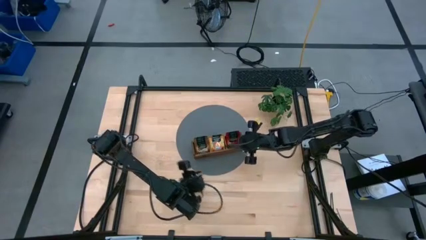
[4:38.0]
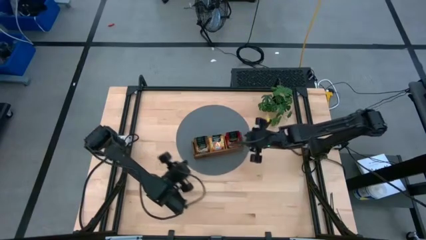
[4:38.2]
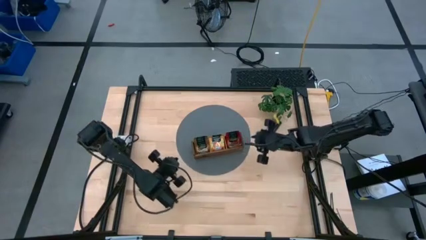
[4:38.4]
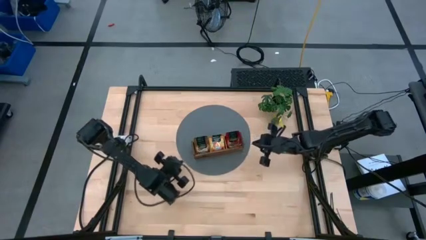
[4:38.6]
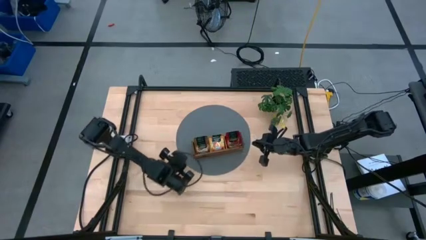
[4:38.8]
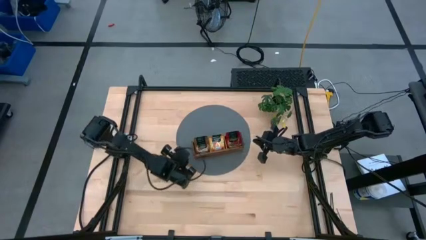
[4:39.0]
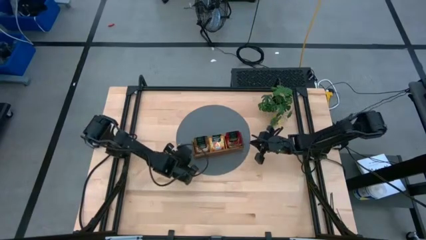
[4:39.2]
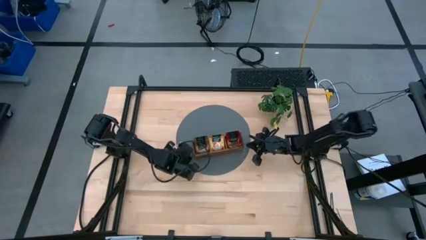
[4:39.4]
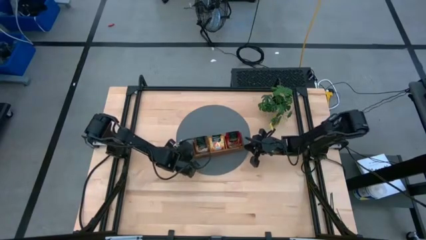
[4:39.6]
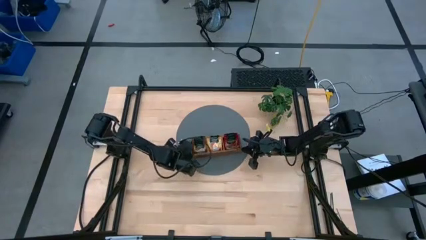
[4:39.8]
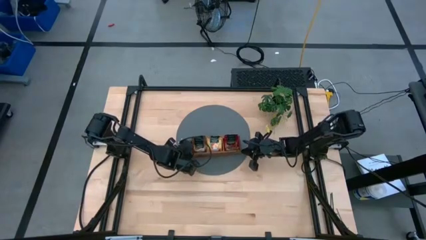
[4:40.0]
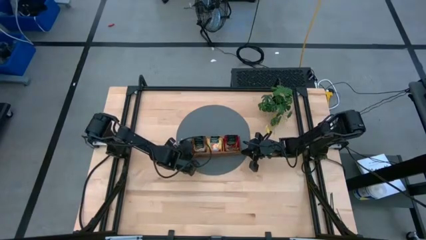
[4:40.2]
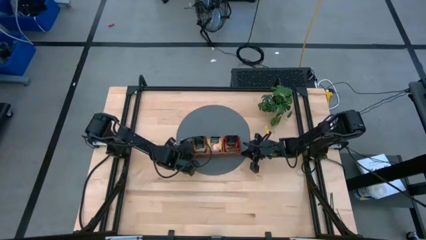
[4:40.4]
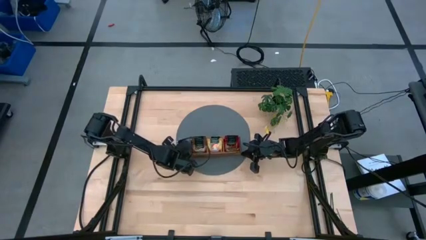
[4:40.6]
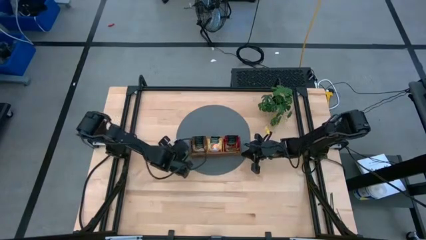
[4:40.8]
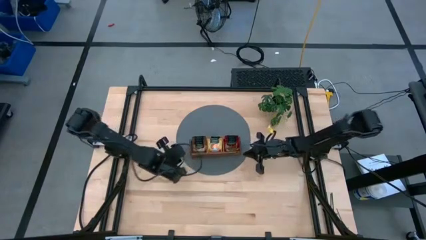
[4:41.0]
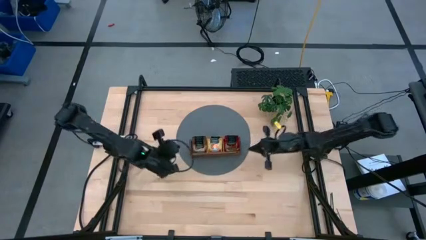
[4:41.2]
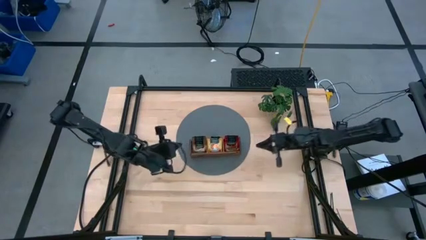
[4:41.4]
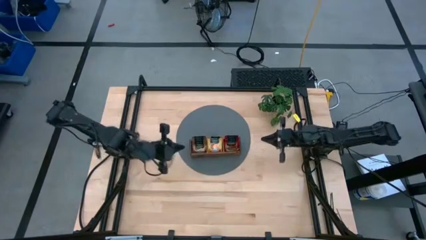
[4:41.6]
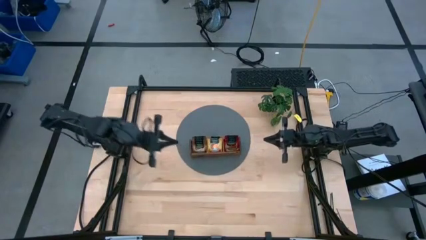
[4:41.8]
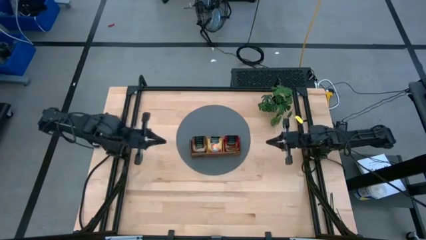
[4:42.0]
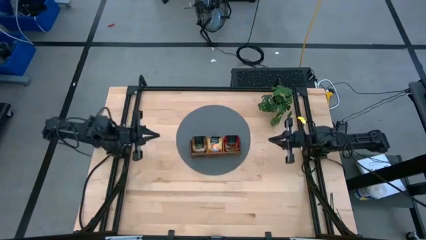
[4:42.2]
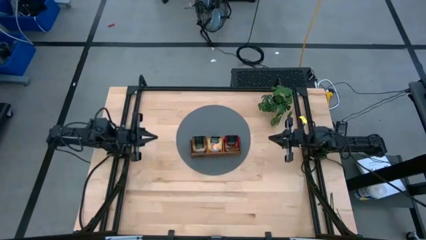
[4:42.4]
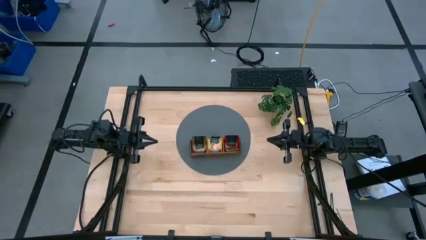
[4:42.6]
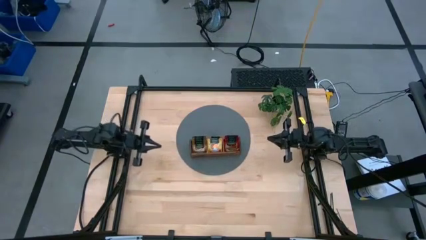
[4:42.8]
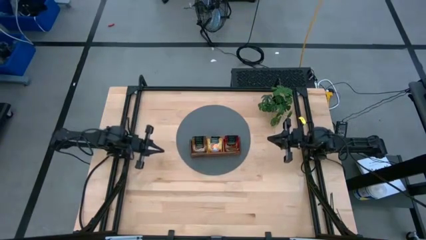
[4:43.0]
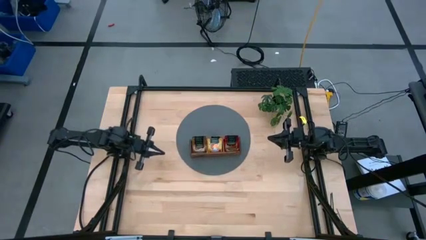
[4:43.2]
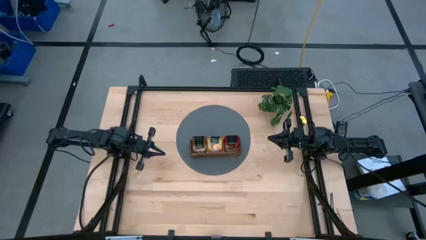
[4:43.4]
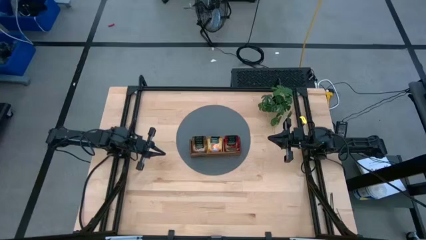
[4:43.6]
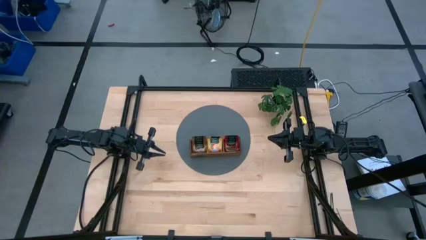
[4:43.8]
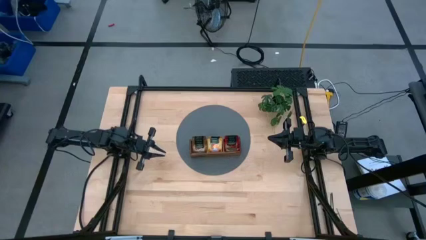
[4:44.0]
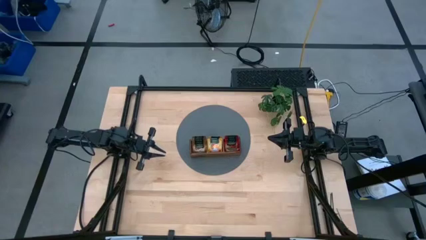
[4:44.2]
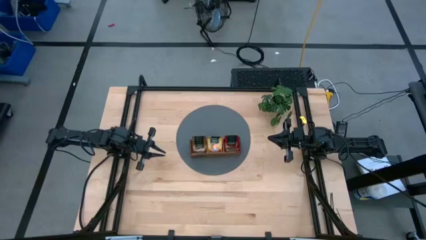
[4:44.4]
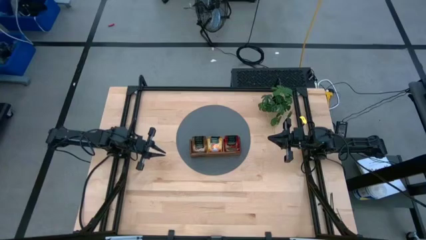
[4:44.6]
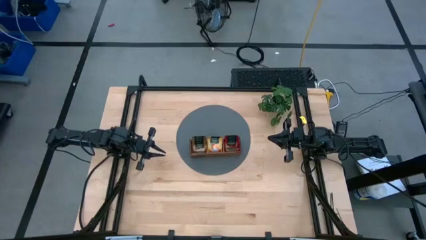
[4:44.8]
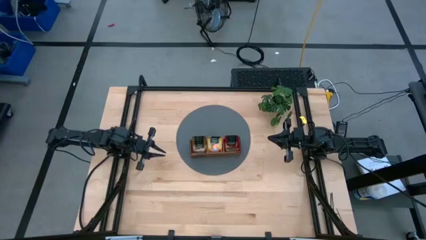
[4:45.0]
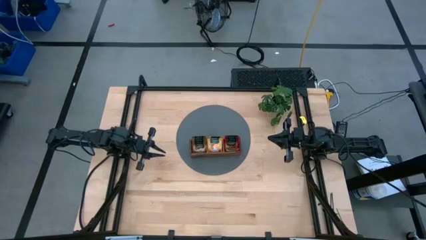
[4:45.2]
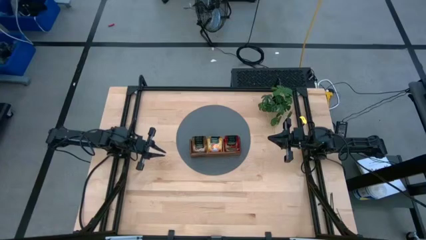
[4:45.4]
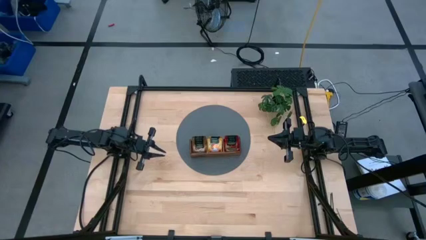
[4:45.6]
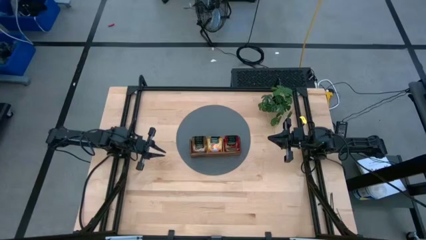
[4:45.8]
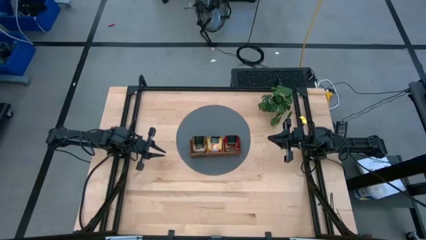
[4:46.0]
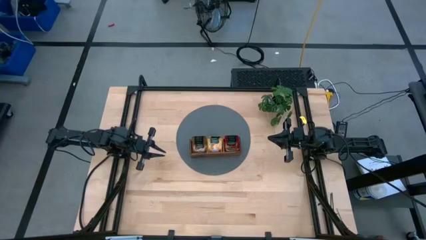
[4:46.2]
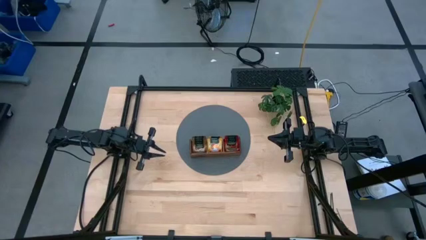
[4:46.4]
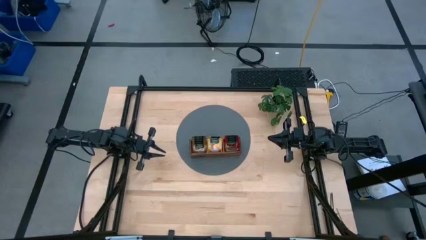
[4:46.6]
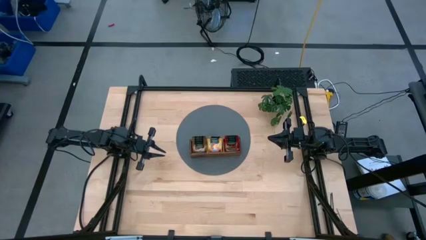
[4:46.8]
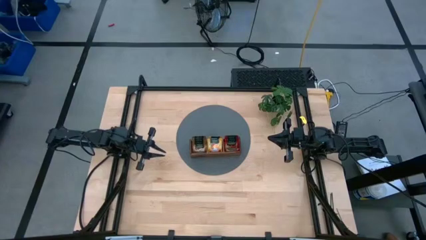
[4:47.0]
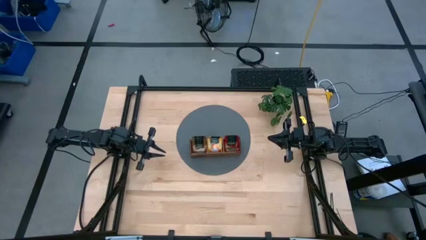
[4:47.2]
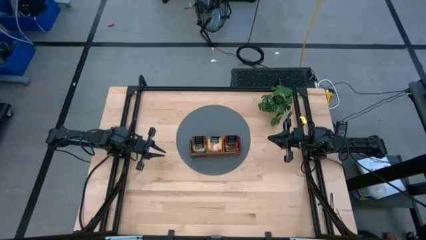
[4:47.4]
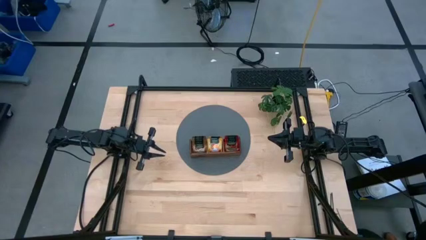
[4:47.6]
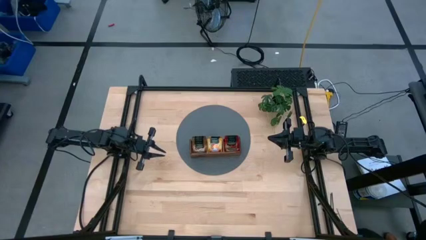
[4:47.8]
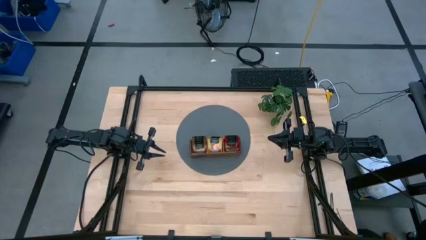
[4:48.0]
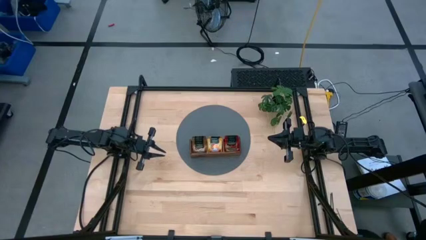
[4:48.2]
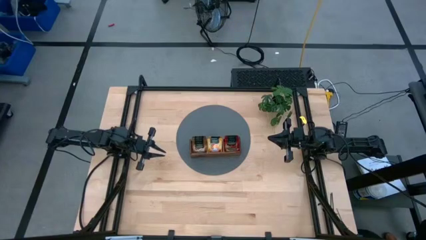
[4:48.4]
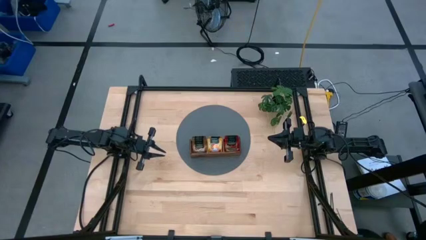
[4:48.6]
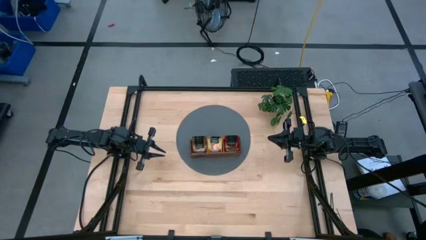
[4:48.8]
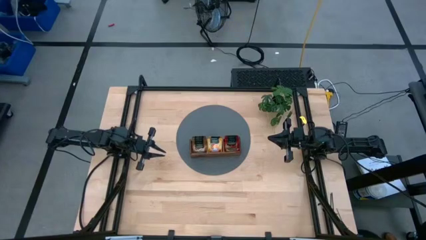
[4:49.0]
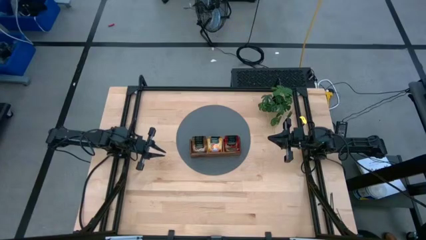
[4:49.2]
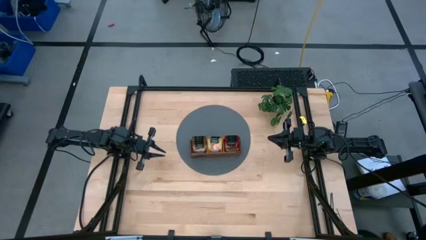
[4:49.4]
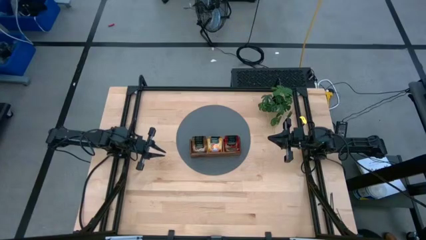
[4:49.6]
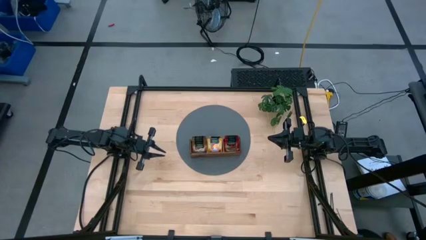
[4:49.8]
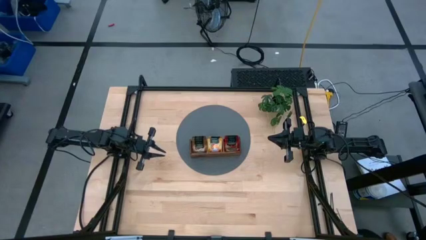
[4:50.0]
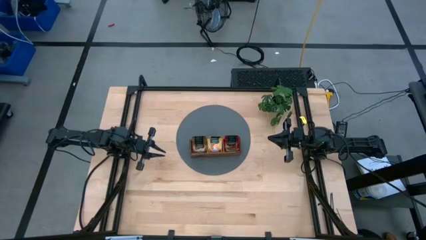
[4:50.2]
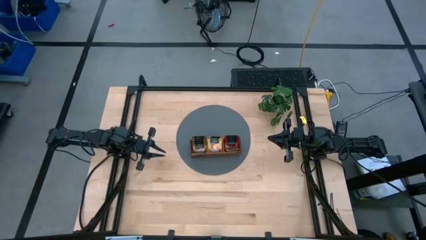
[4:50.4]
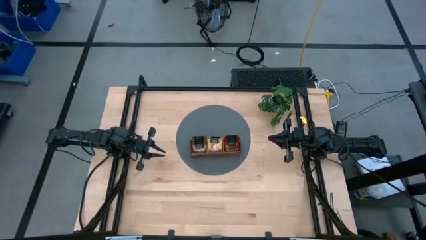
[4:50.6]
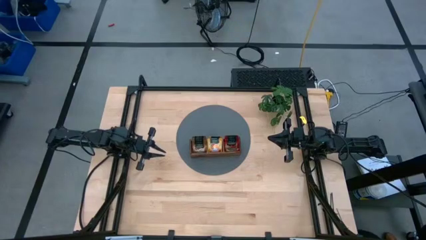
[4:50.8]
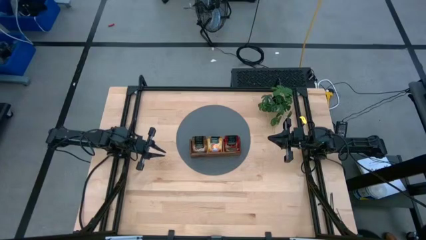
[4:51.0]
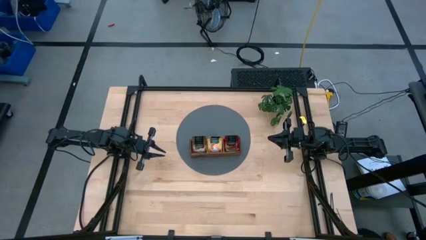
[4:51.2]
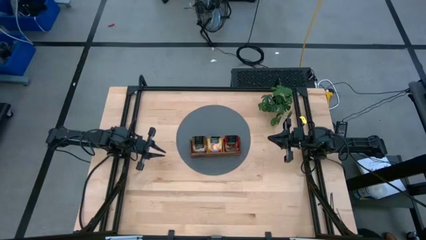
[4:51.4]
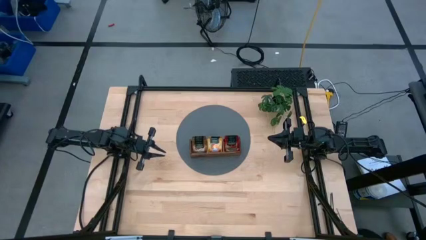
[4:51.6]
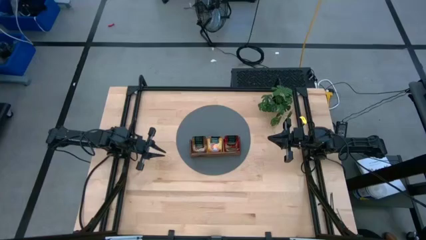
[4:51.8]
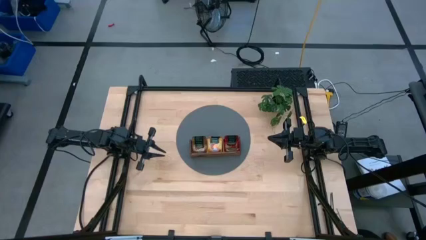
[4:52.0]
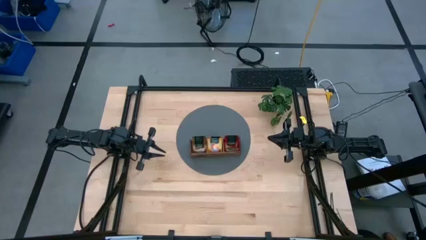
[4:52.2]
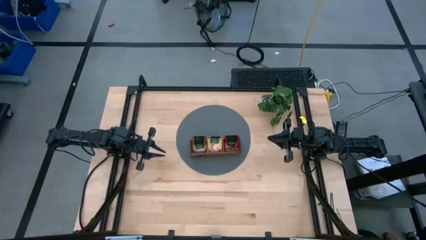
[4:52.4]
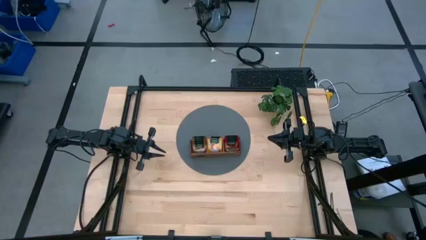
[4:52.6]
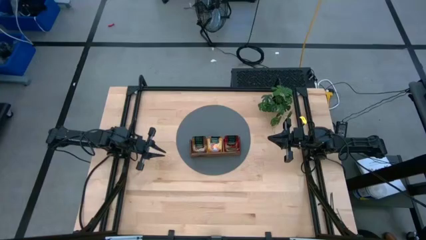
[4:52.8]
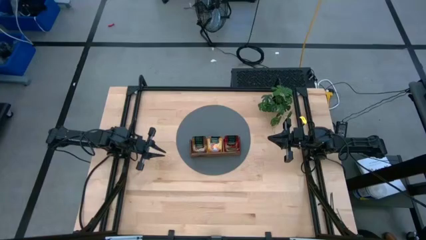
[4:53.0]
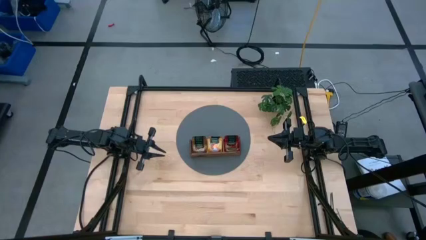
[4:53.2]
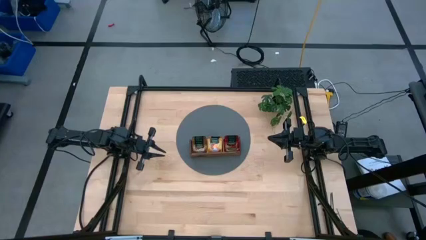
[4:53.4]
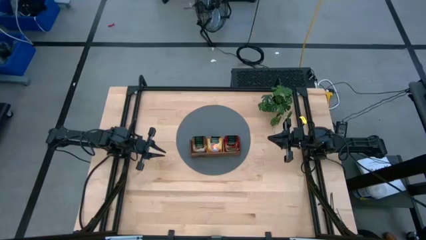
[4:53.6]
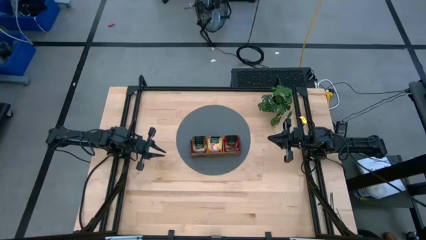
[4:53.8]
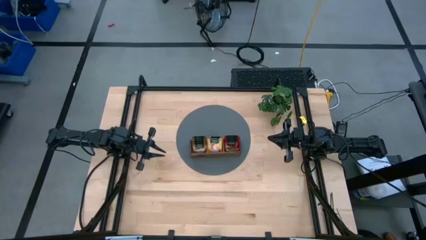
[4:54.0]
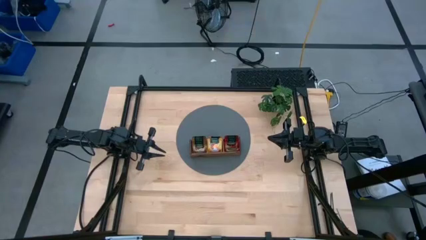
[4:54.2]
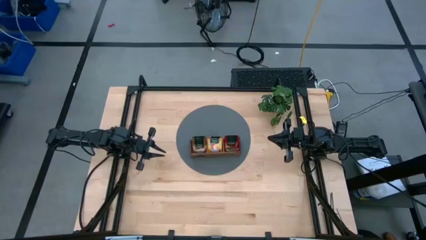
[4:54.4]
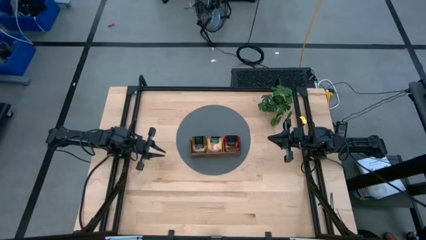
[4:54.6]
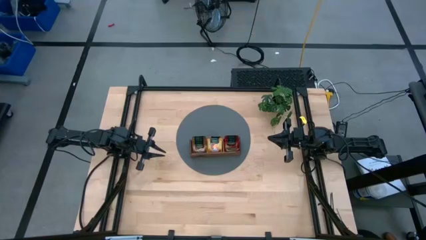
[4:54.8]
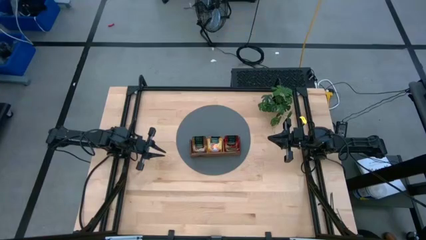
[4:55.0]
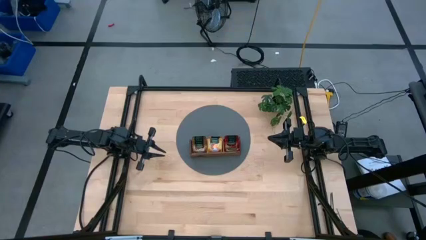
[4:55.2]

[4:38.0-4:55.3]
Task: Pick & Place Tea
Return to Home Position
